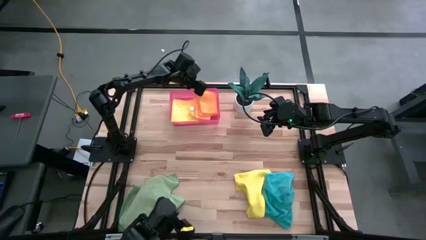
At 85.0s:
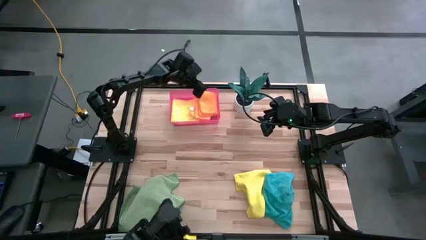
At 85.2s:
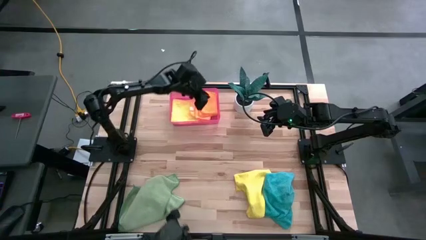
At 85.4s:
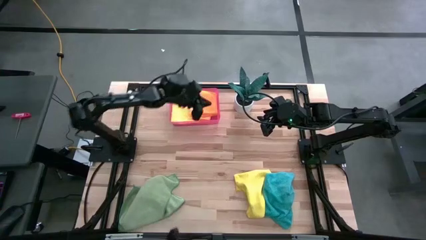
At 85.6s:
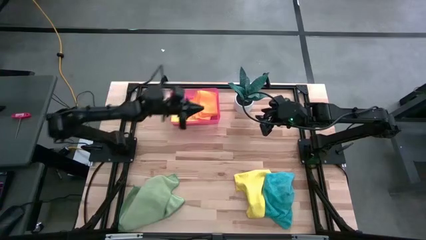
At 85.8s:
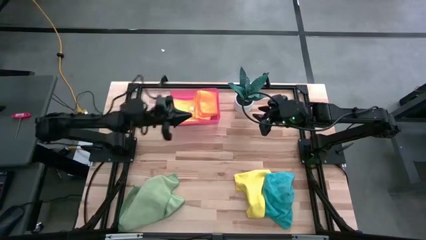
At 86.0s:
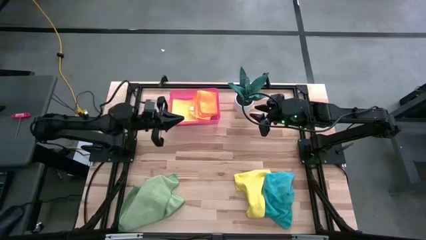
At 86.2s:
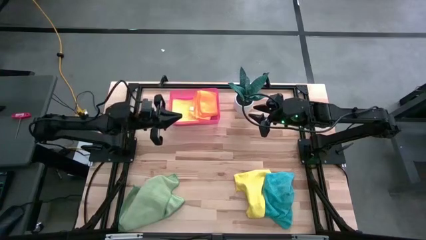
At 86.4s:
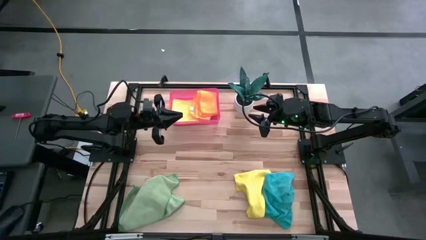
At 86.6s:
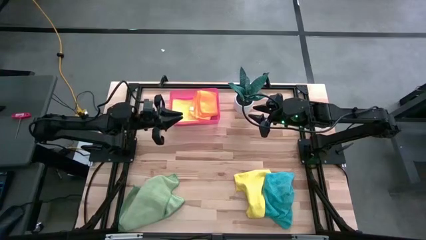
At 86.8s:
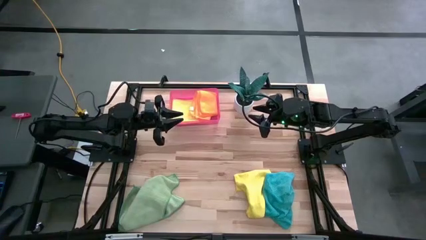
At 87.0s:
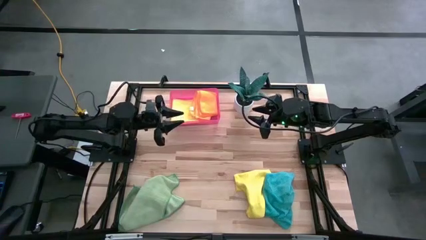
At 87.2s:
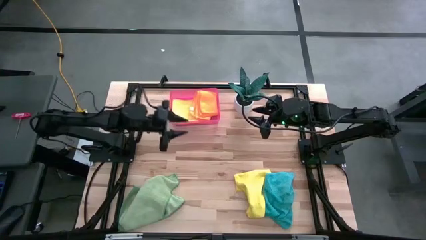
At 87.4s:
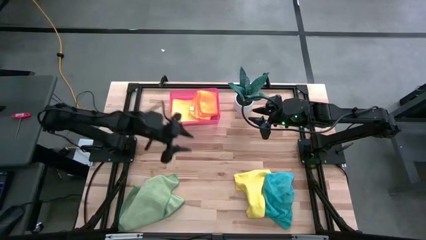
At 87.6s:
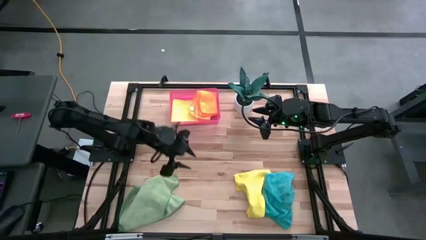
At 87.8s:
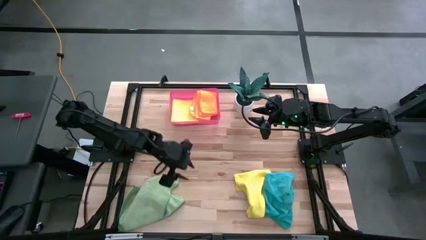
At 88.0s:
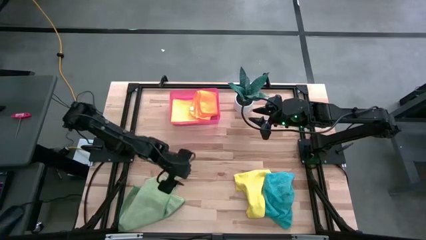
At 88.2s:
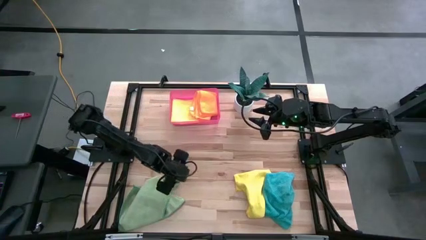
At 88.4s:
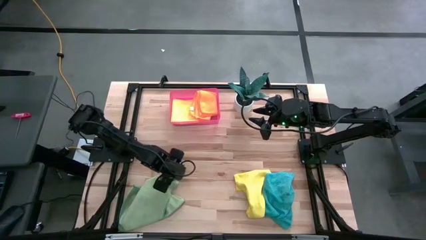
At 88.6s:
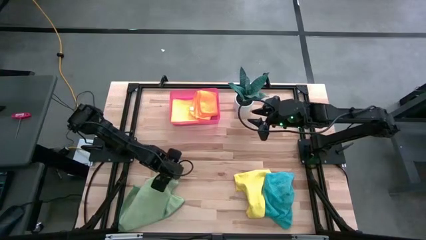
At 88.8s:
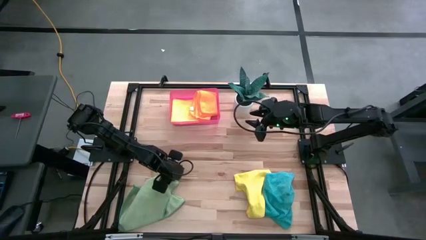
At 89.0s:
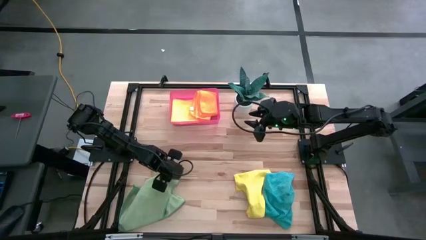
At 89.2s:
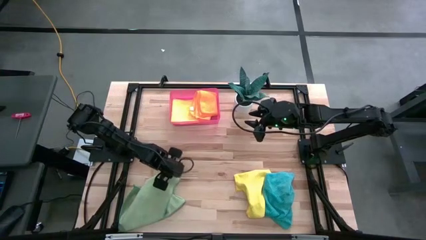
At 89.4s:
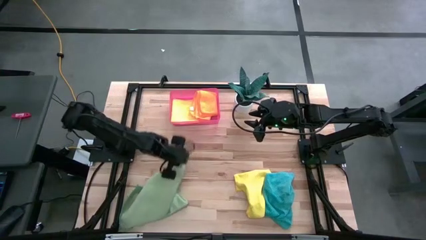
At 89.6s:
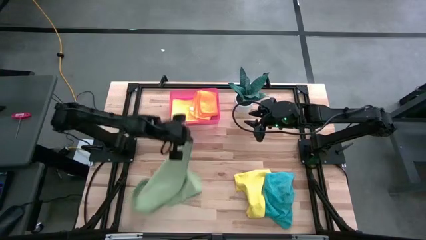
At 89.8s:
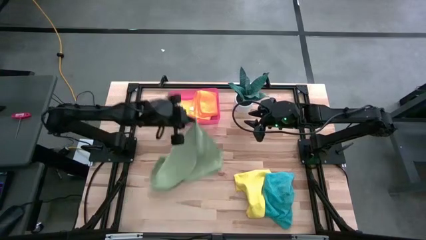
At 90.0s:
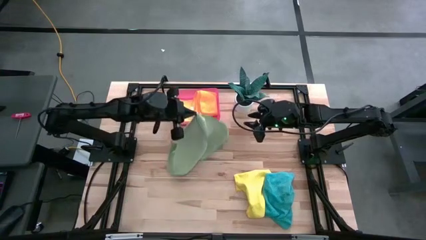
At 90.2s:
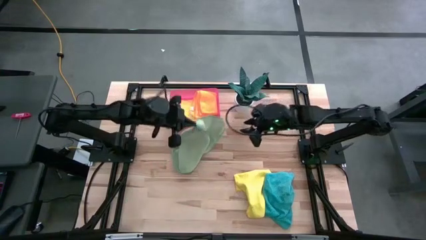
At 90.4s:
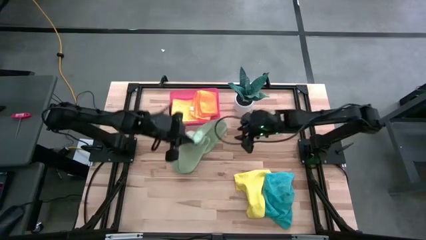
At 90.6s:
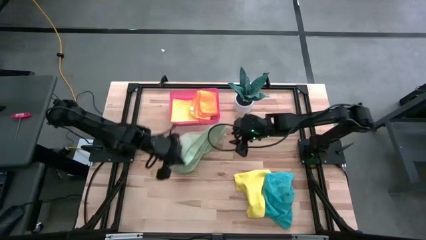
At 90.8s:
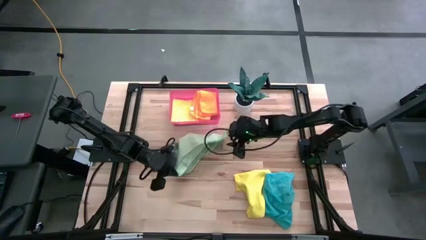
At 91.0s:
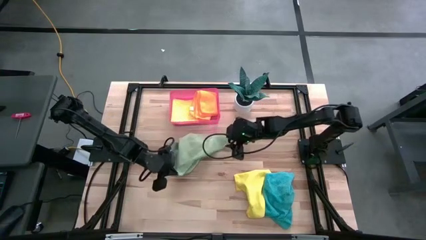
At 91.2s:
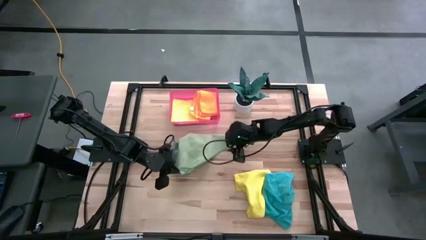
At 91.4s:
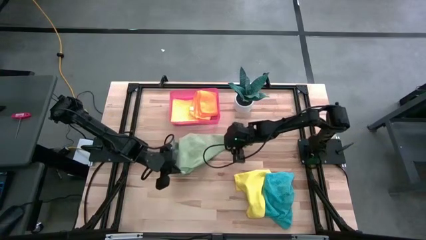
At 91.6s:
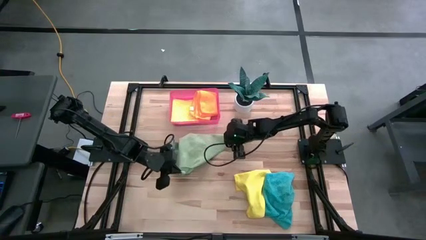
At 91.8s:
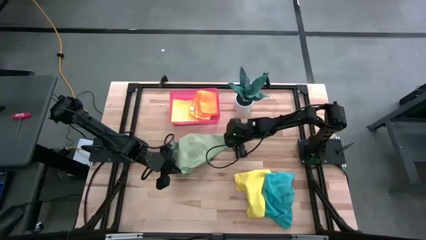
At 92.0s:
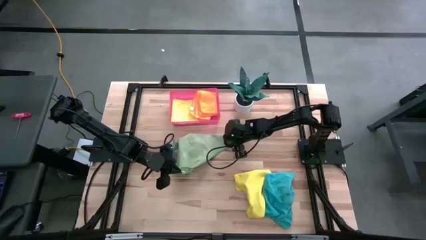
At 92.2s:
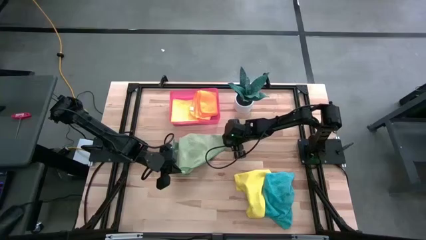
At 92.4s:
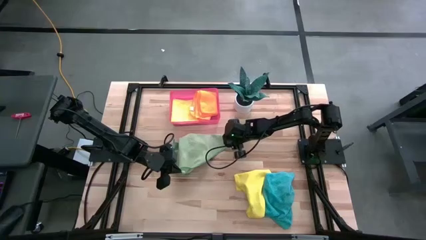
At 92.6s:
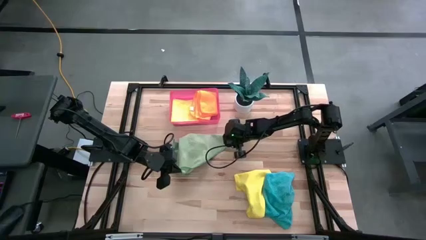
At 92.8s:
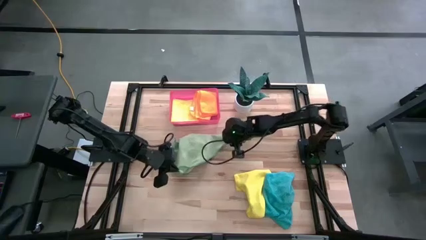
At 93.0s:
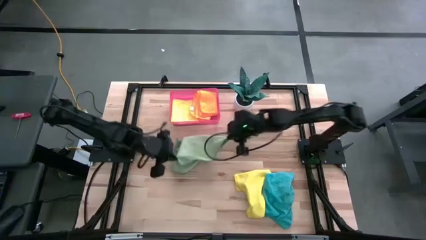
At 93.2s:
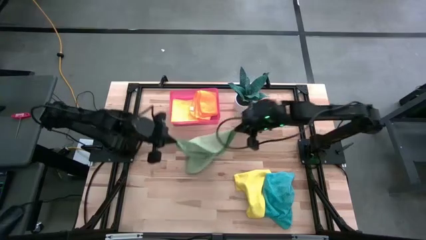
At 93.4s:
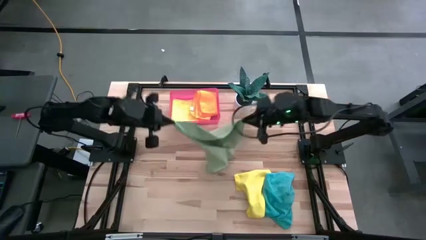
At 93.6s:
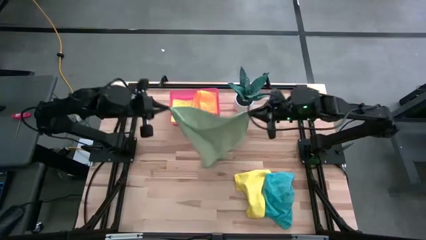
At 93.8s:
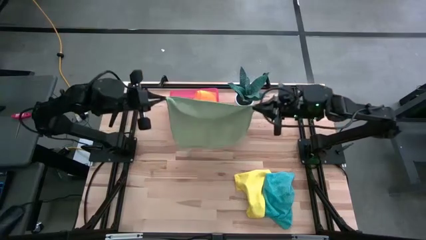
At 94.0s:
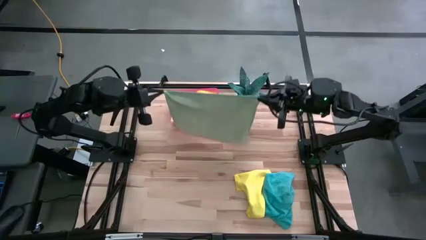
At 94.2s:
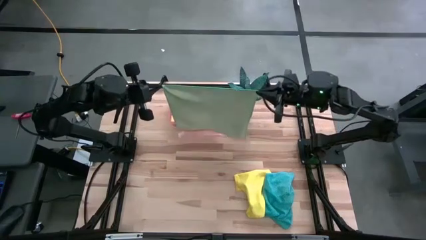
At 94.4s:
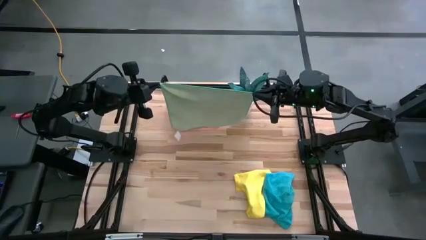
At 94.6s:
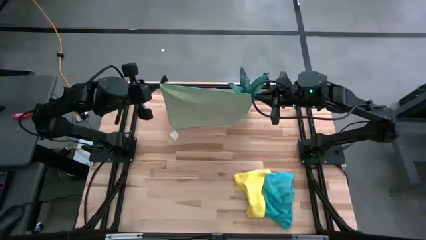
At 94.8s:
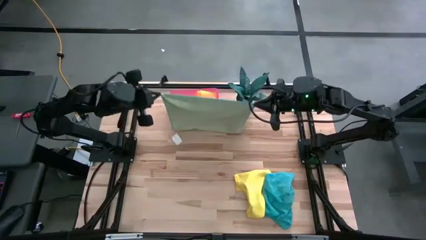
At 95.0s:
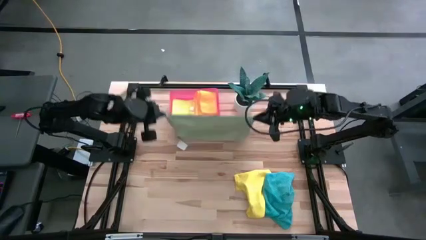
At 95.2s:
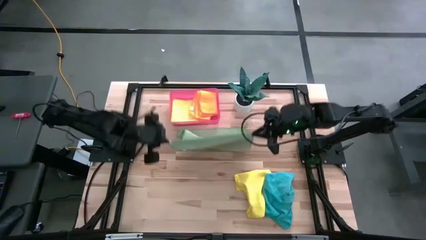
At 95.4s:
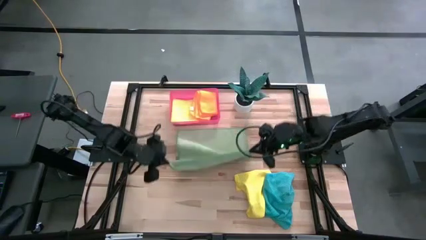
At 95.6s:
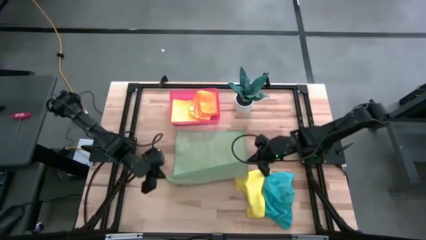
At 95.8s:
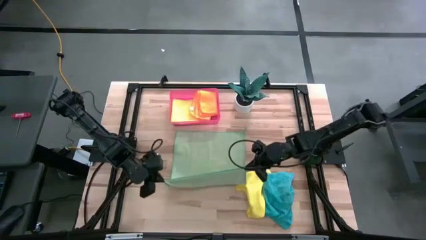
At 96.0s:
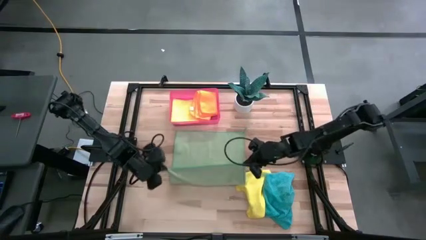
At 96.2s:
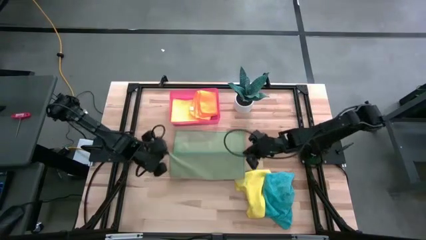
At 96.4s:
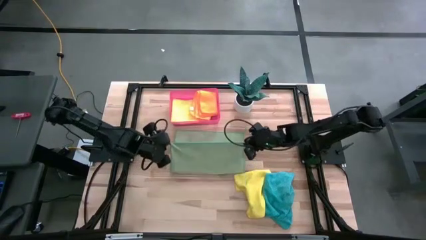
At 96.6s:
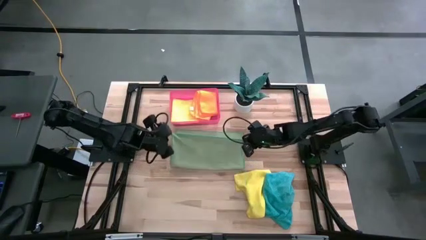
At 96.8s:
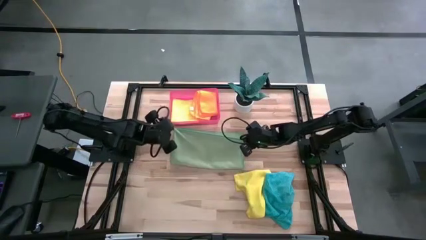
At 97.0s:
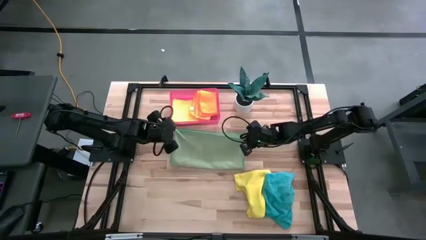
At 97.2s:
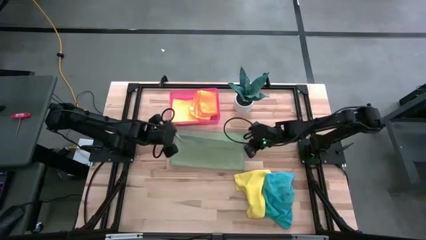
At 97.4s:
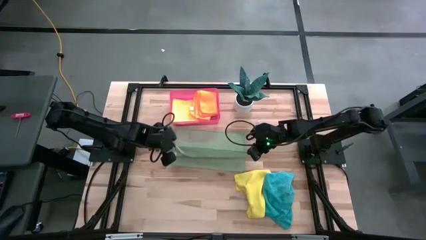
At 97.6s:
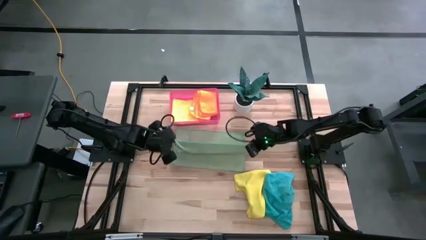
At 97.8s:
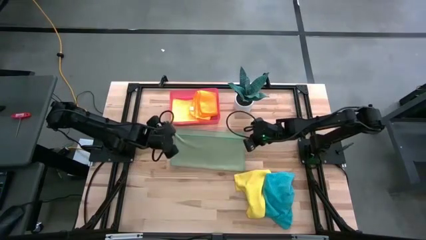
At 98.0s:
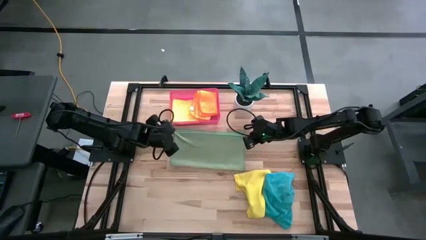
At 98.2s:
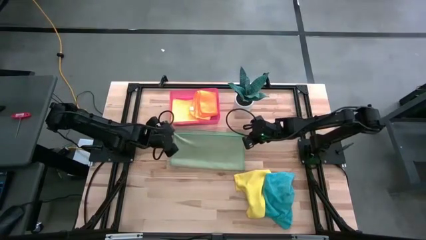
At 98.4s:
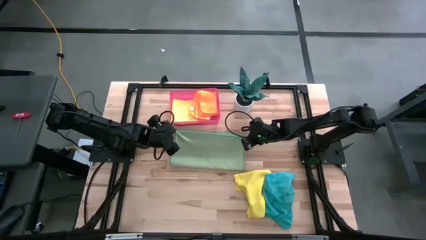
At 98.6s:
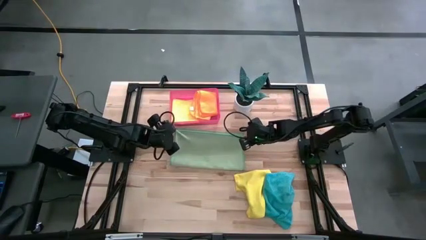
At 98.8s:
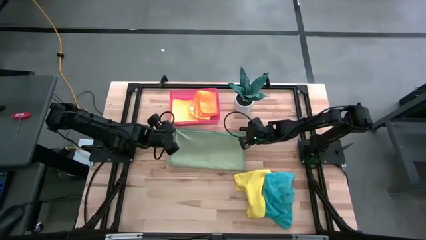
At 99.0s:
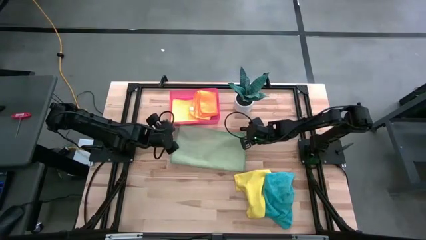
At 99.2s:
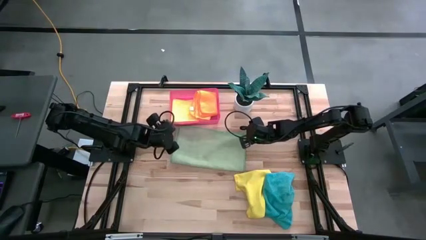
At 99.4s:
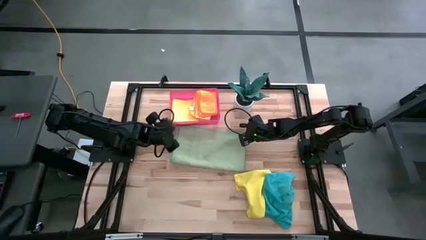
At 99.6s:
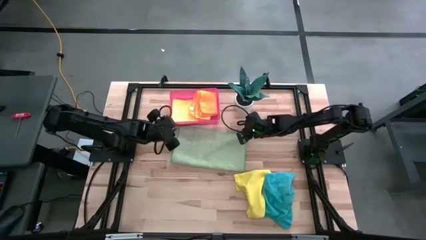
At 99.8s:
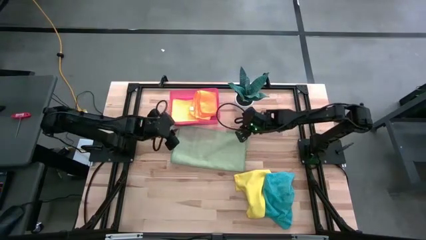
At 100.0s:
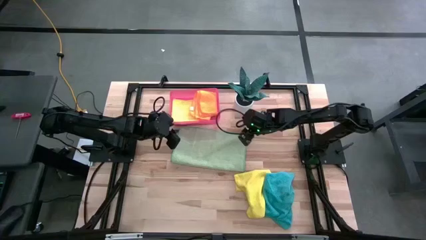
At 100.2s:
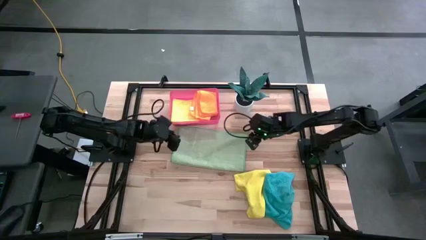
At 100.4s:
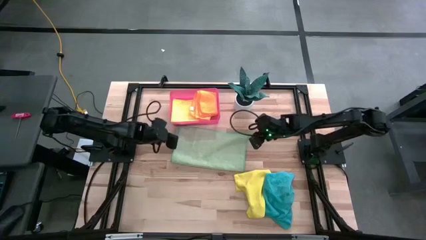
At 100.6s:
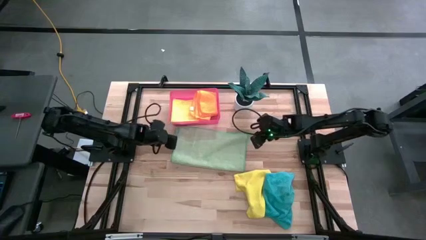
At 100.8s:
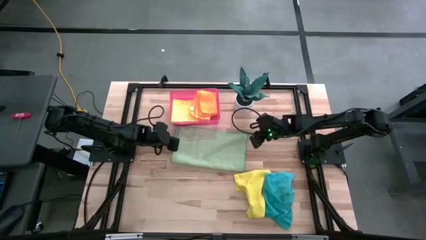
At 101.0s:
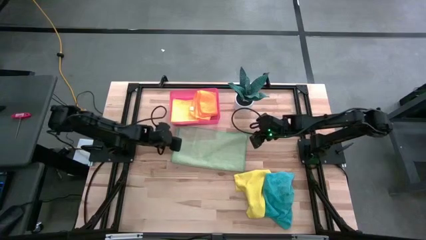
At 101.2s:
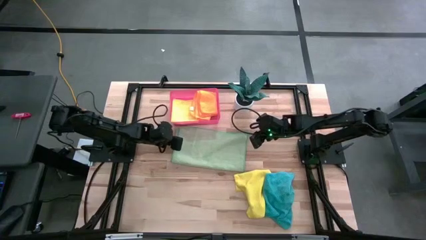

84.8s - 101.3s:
Task: Fold microfiber towels
Fold the green microfiber towel
